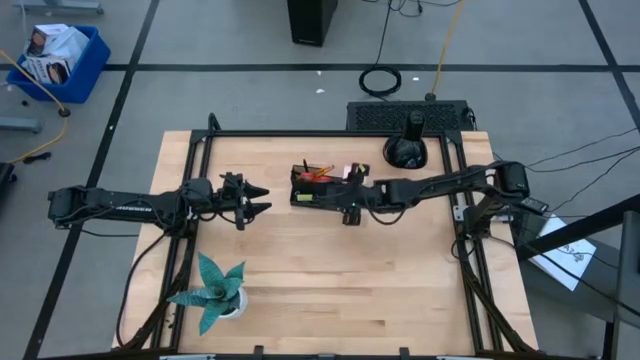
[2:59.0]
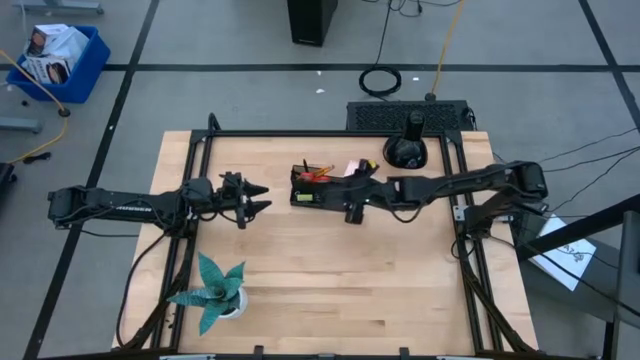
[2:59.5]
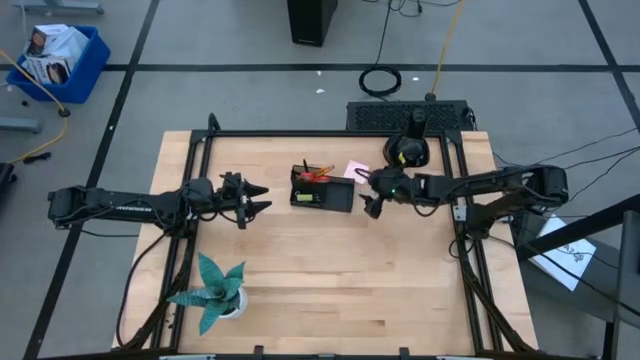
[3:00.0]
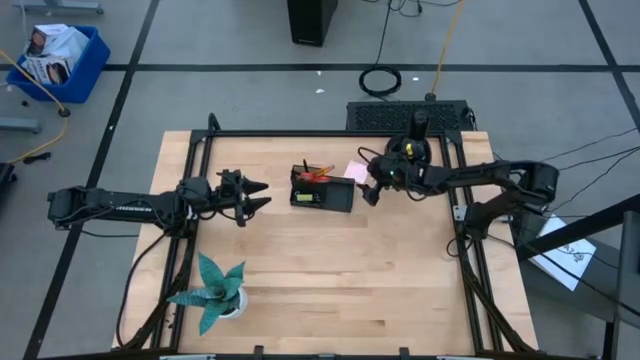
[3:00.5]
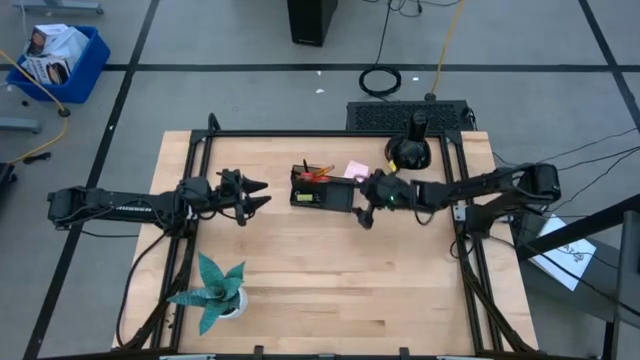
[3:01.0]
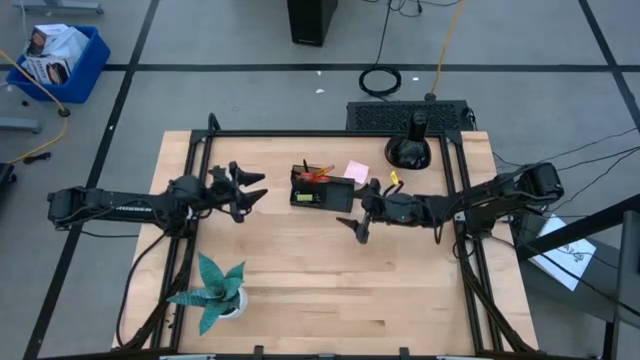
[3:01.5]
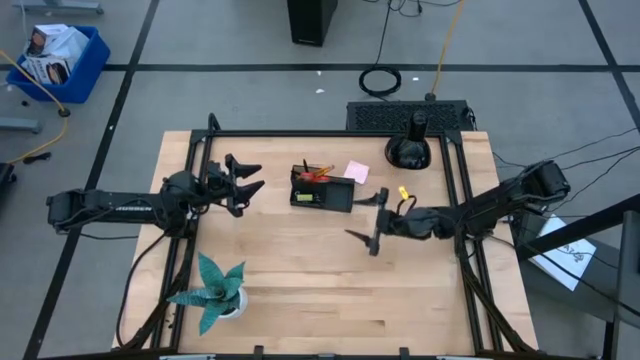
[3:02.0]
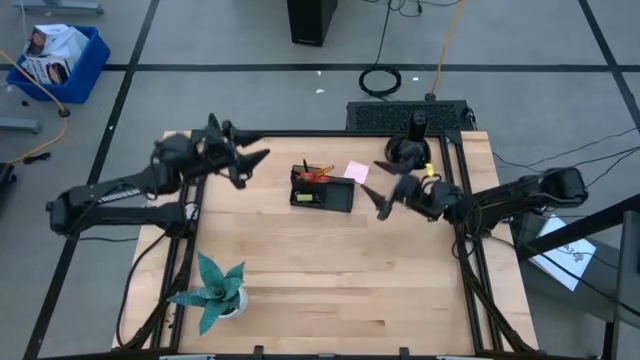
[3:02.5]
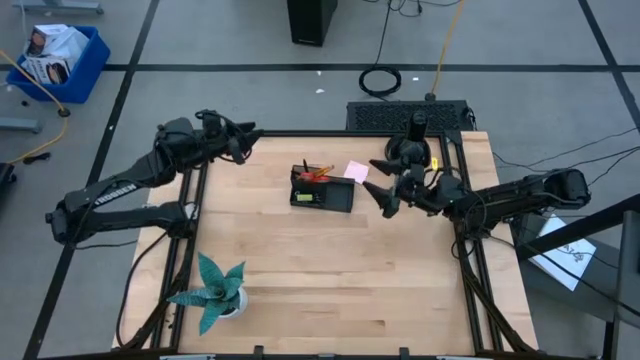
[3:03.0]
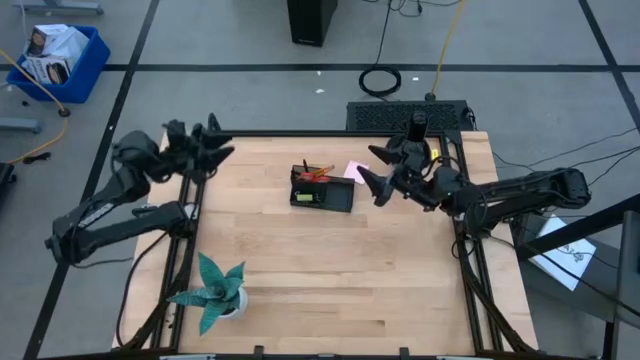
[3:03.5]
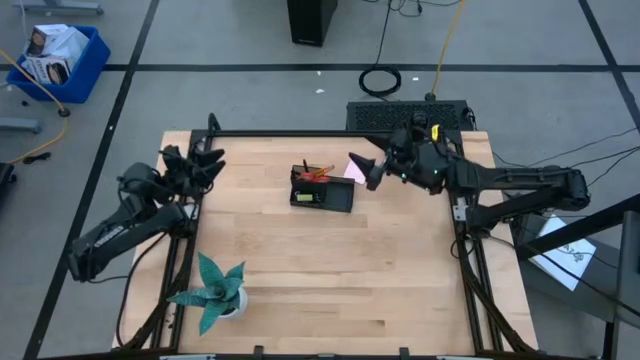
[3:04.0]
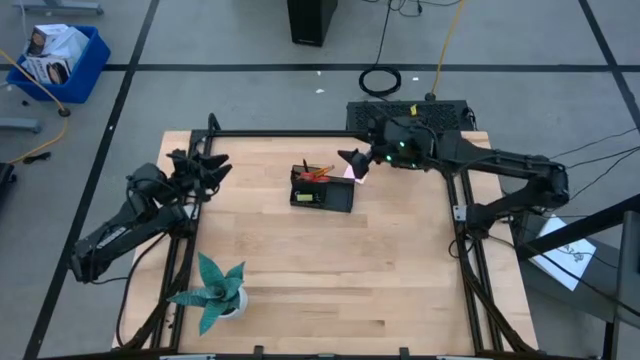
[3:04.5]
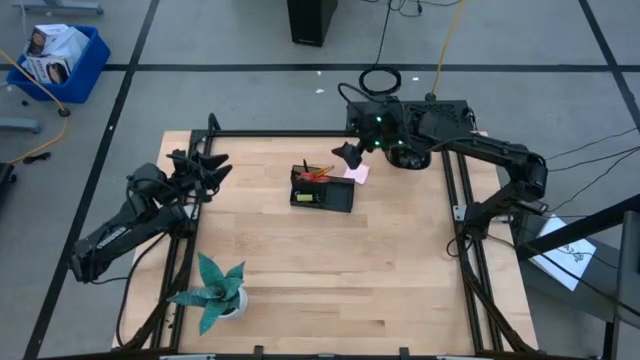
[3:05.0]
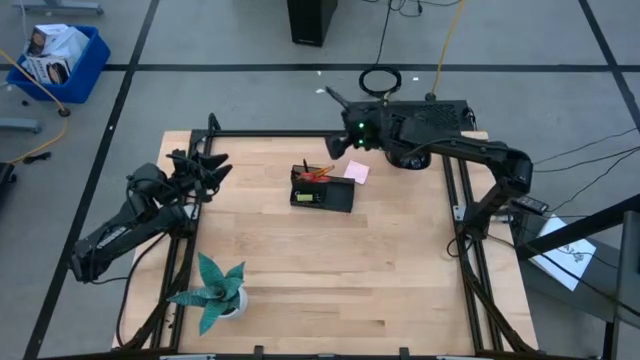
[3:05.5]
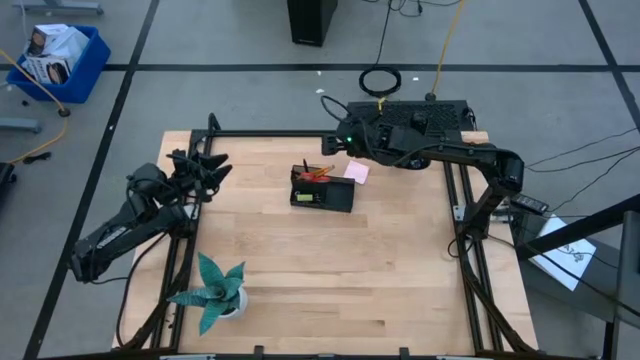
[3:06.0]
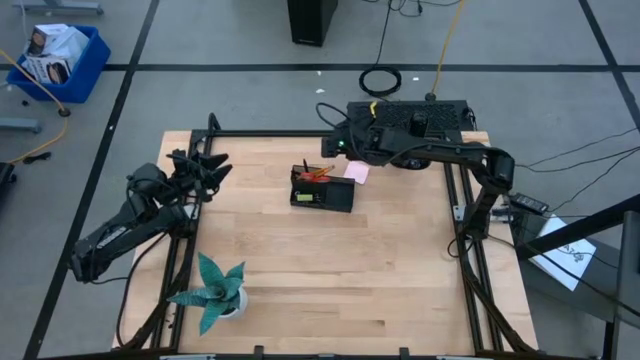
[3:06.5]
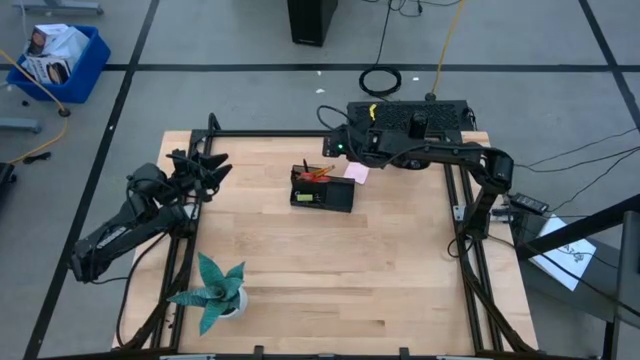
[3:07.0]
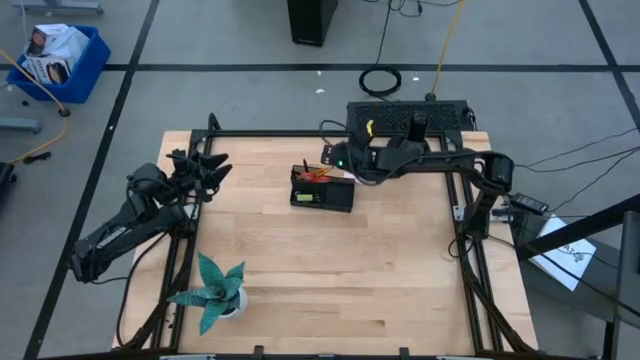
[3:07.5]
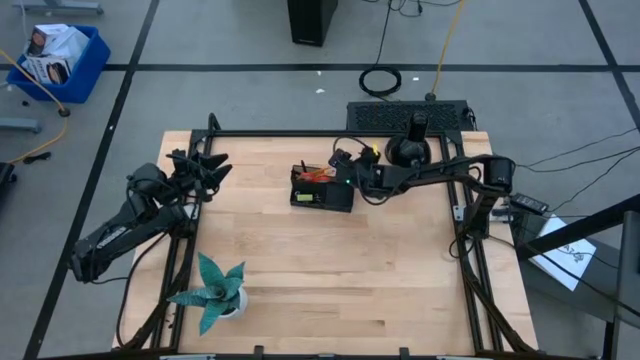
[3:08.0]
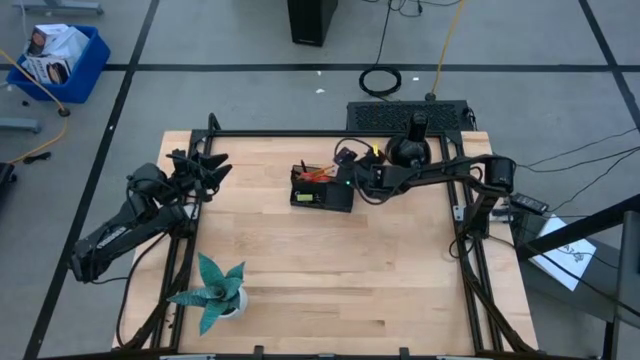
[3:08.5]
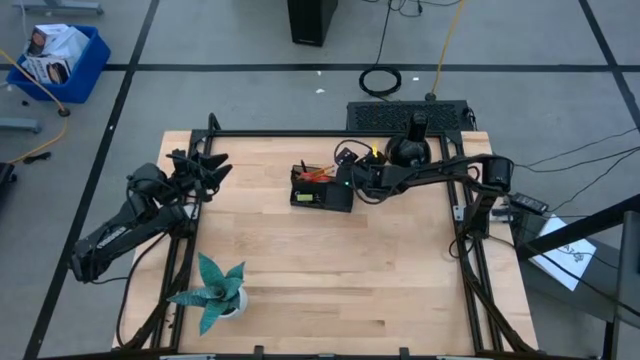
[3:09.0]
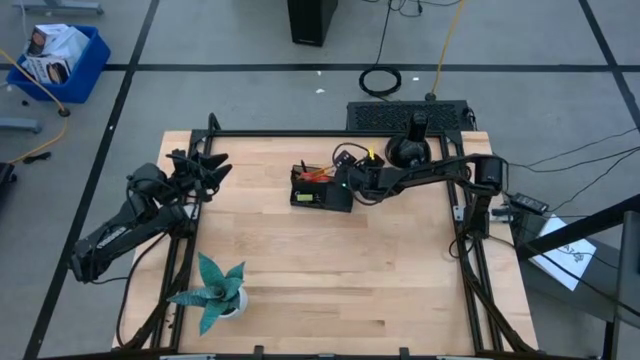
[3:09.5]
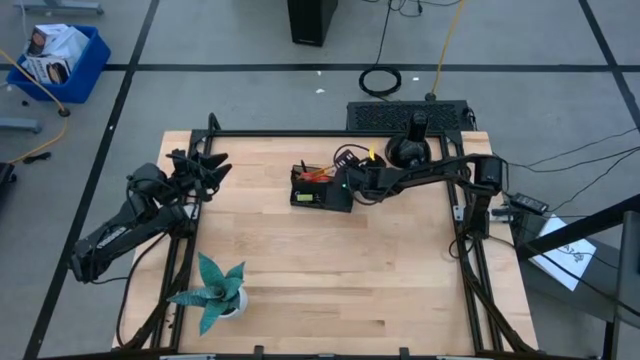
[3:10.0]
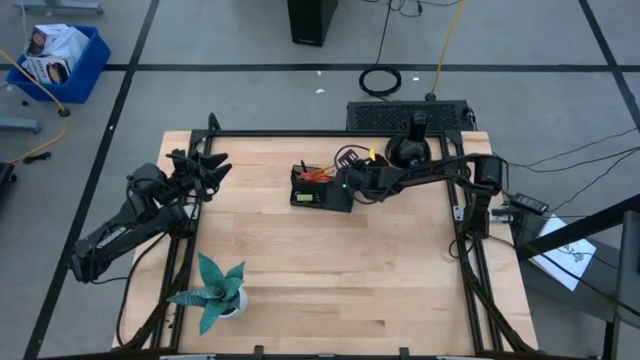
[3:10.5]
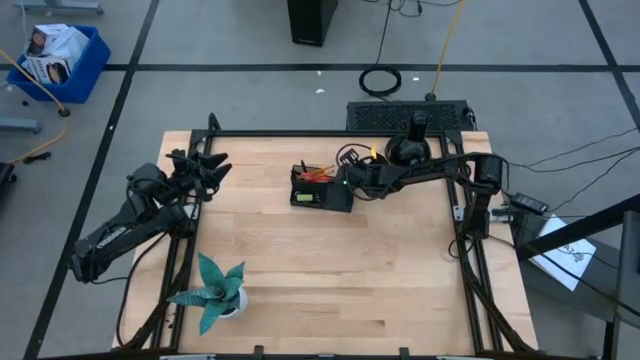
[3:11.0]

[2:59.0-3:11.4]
Task: Pick and place office supplies into organizer
Put the pink sticky notes into the black desk organizer

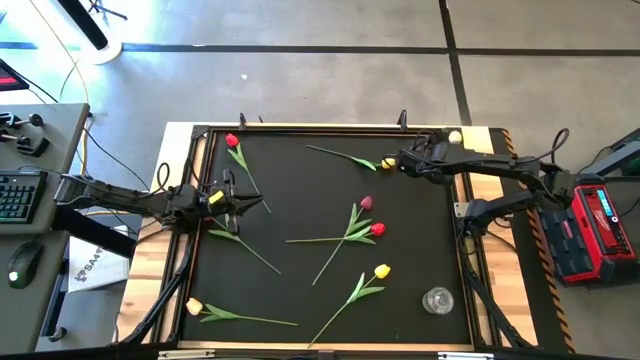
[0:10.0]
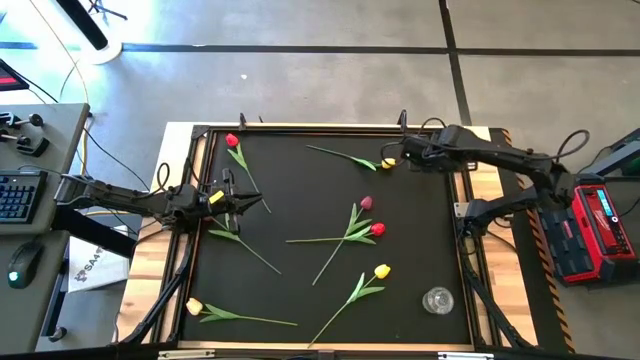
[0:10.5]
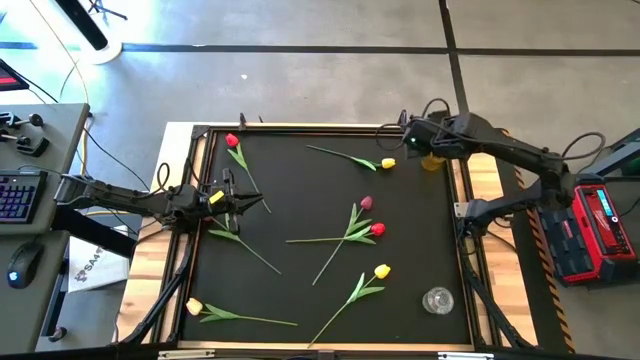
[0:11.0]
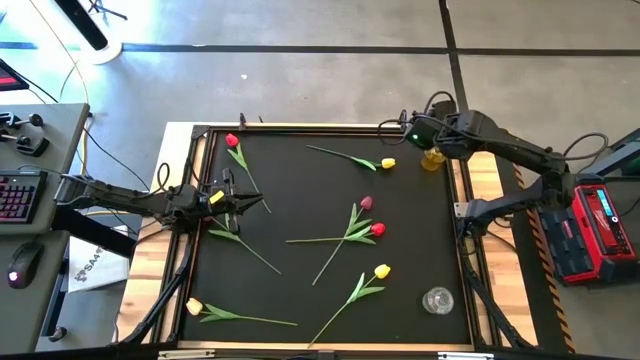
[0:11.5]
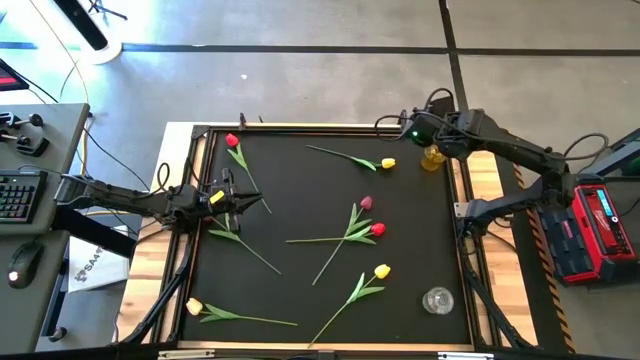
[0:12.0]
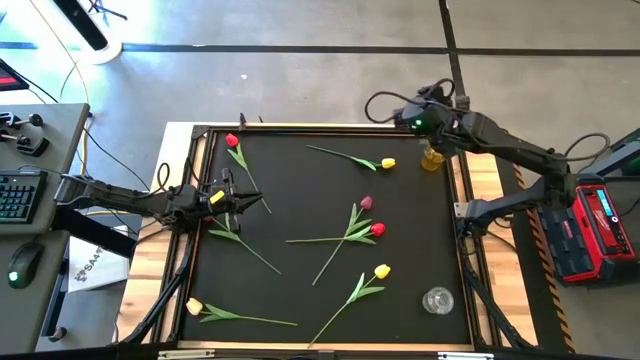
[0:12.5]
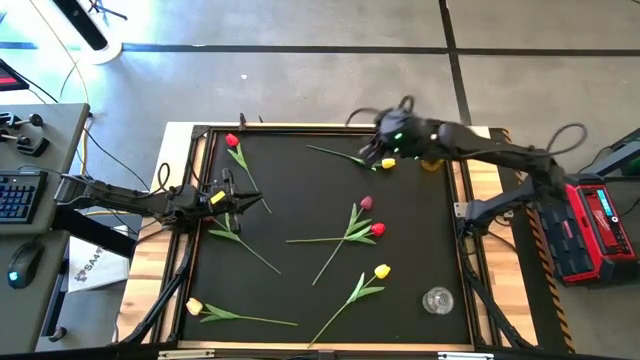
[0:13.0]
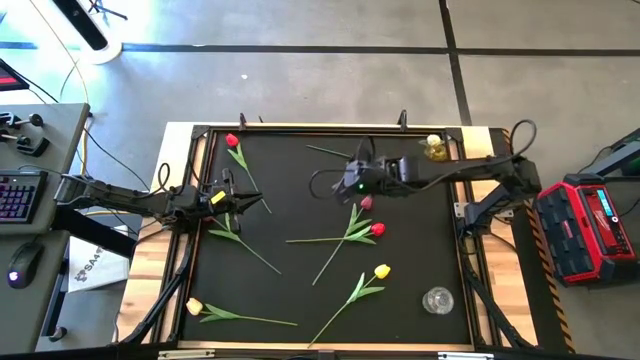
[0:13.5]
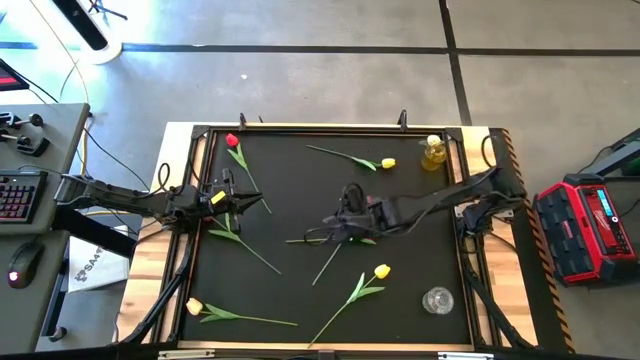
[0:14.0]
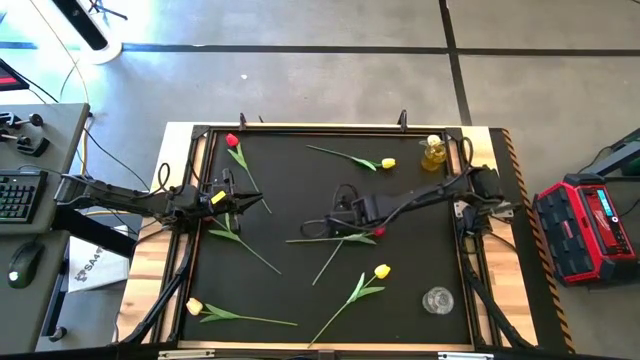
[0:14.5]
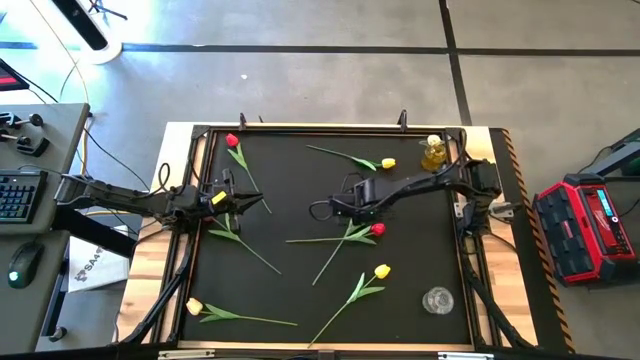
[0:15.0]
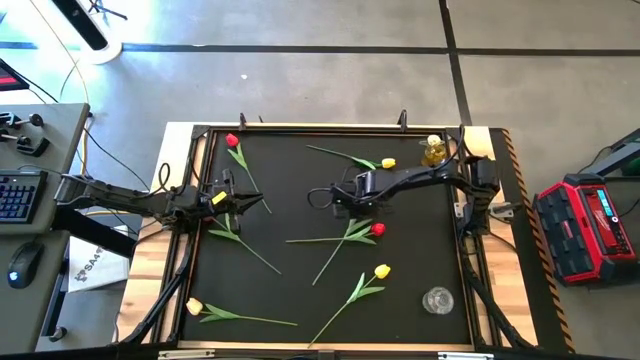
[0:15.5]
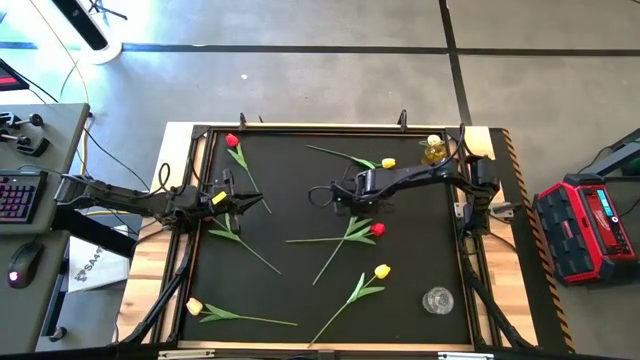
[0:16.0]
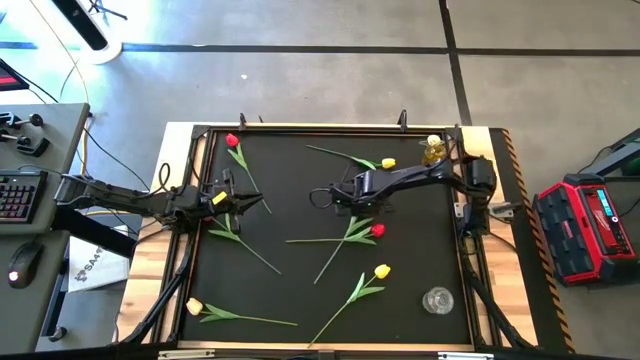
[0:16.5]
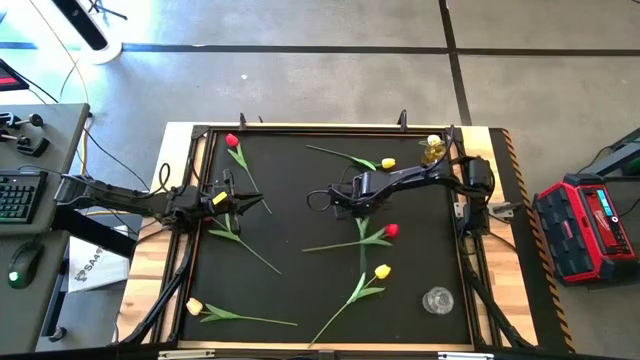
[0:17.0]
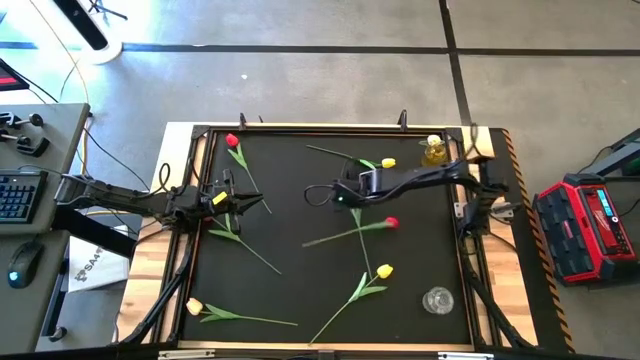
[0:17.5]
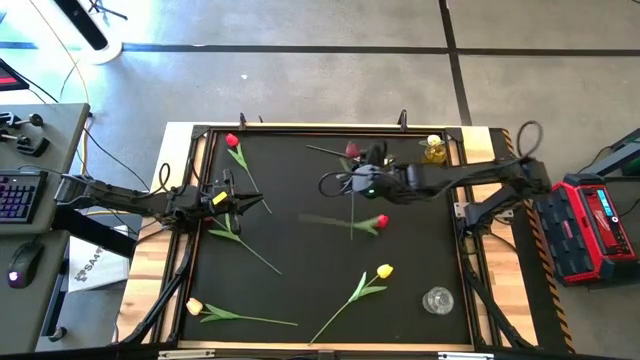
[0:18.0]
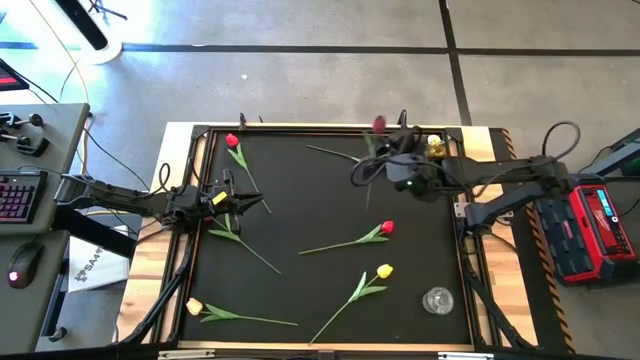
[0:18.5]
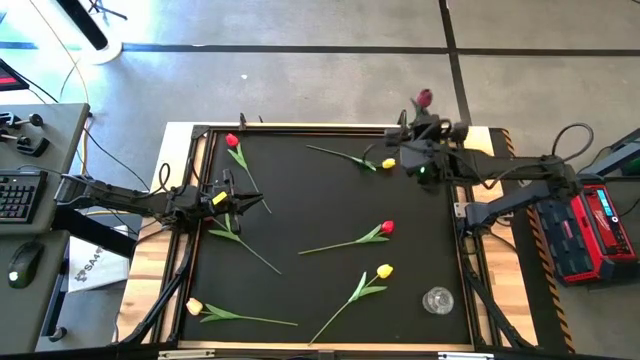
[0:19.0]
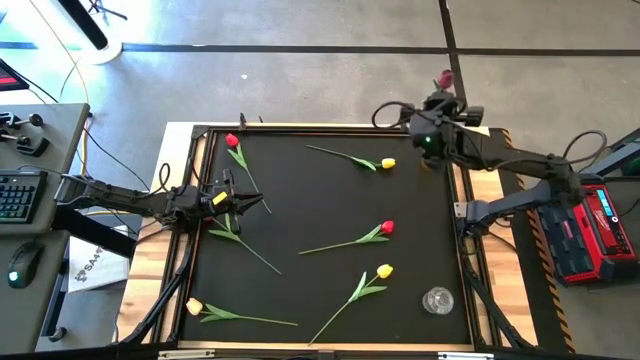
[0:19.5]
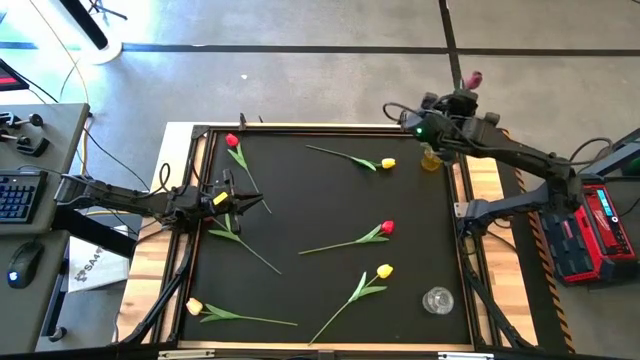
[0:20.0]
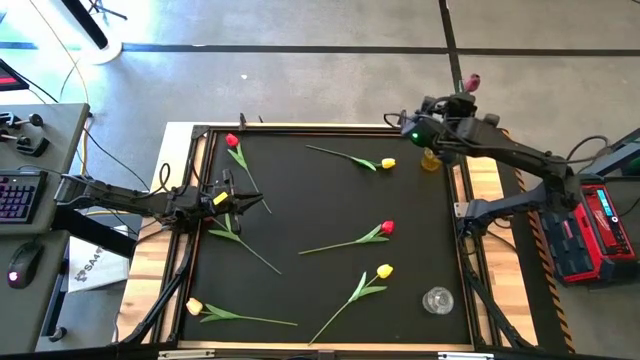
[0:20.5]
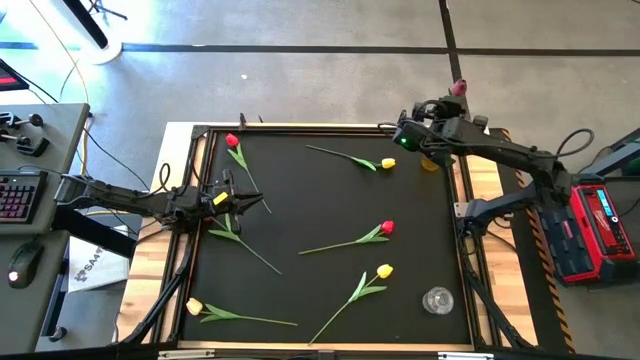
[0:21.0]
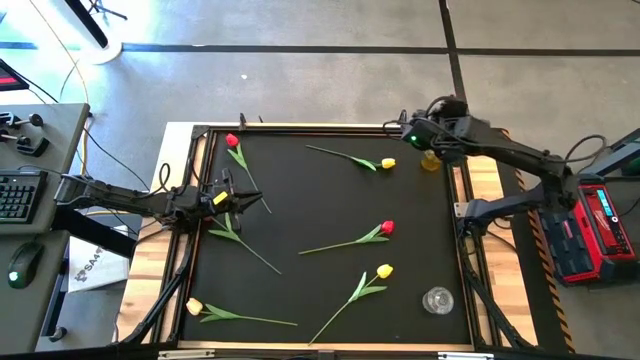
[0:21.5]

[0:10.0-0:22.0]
Task: Sort flowers into vase by color
Put the right dark red flower into the yellow flower vase
